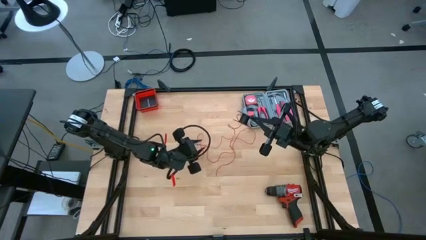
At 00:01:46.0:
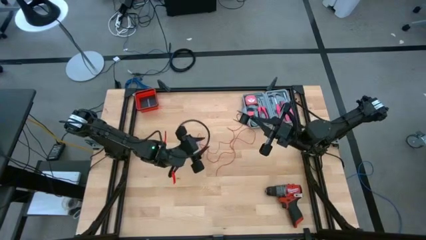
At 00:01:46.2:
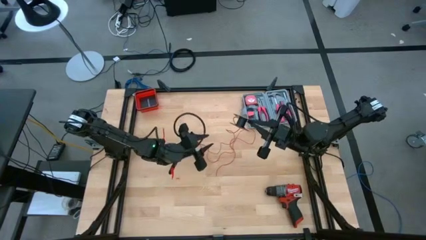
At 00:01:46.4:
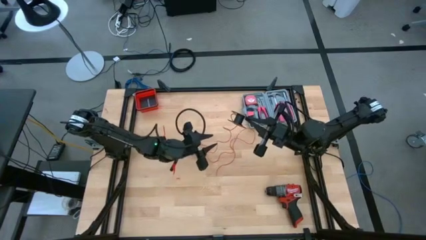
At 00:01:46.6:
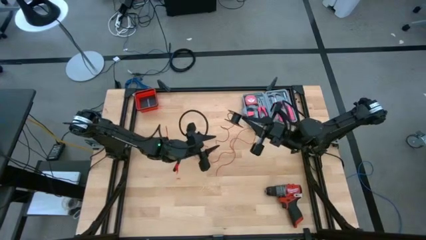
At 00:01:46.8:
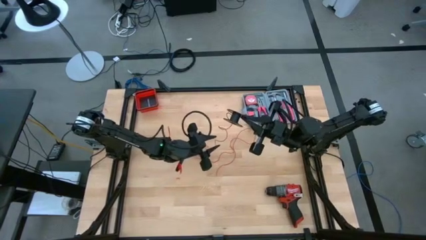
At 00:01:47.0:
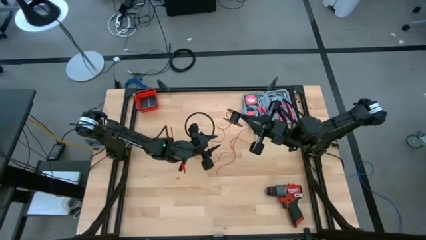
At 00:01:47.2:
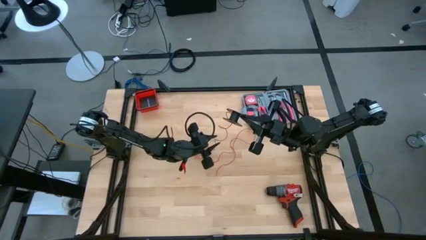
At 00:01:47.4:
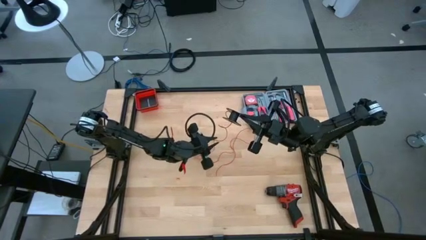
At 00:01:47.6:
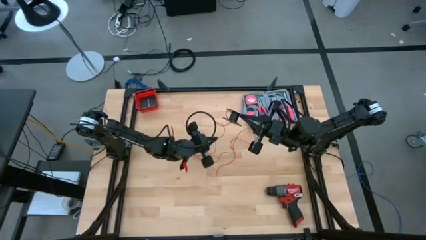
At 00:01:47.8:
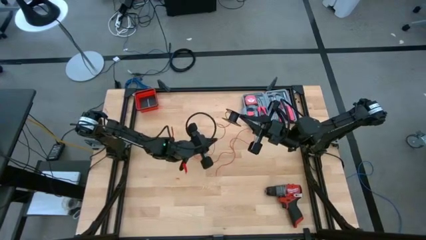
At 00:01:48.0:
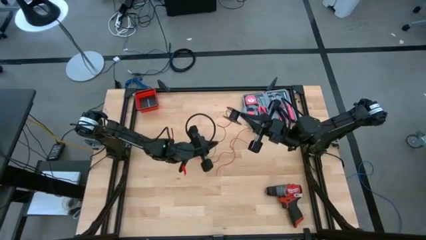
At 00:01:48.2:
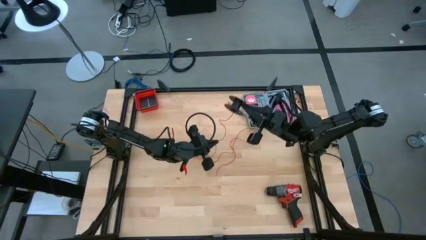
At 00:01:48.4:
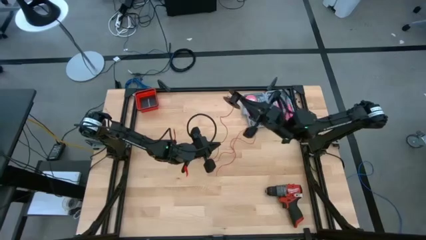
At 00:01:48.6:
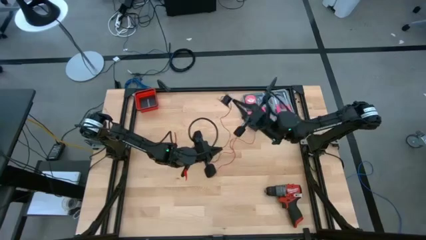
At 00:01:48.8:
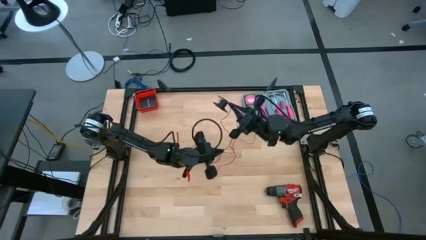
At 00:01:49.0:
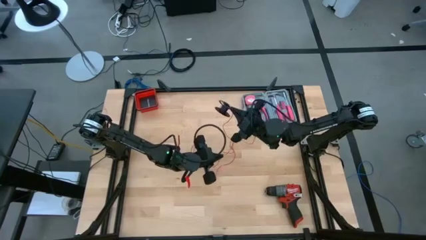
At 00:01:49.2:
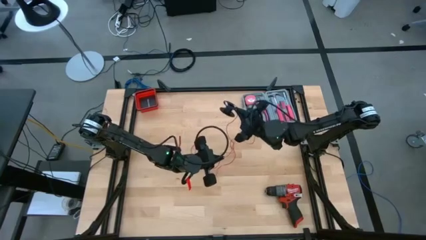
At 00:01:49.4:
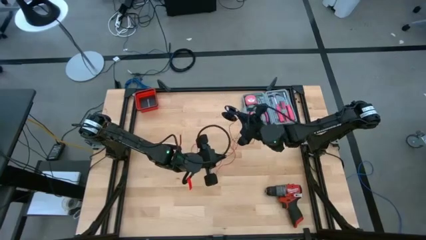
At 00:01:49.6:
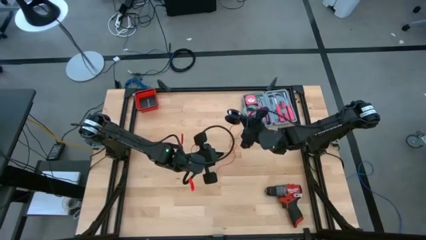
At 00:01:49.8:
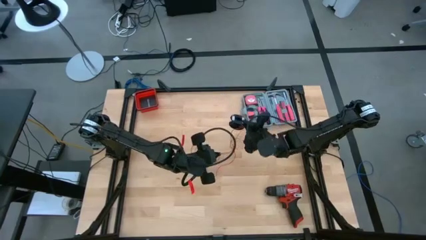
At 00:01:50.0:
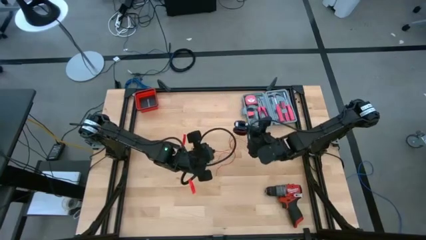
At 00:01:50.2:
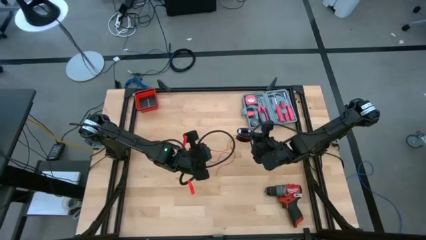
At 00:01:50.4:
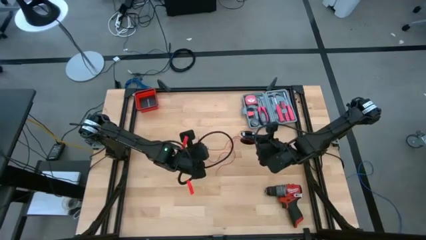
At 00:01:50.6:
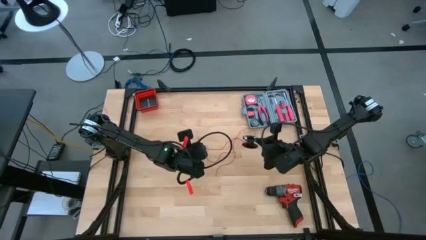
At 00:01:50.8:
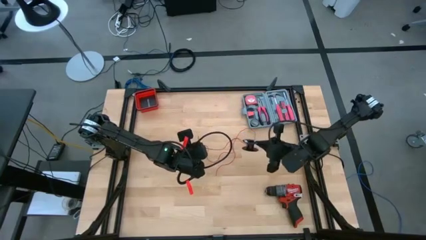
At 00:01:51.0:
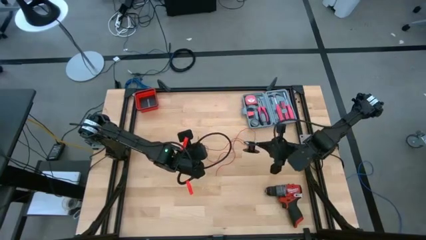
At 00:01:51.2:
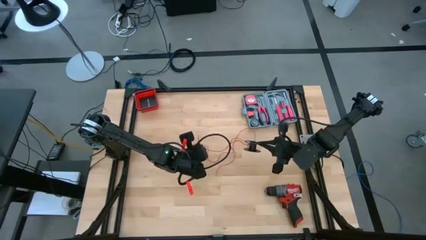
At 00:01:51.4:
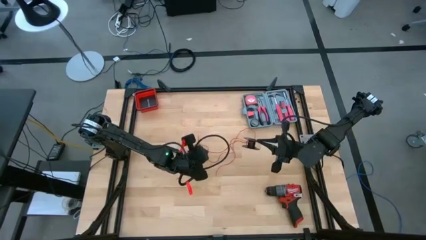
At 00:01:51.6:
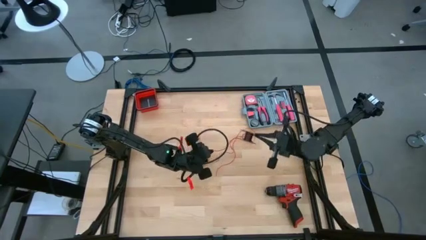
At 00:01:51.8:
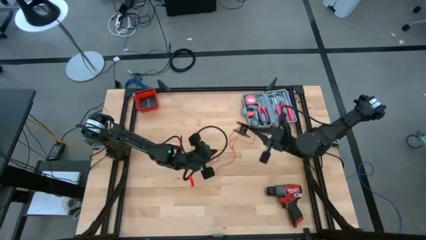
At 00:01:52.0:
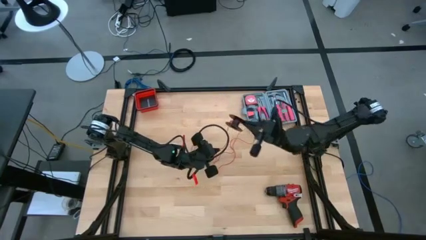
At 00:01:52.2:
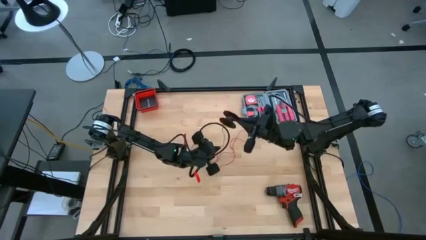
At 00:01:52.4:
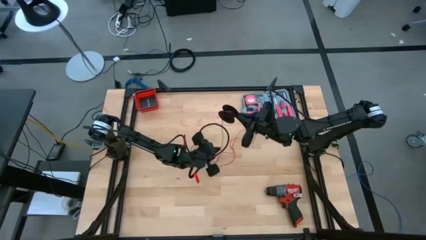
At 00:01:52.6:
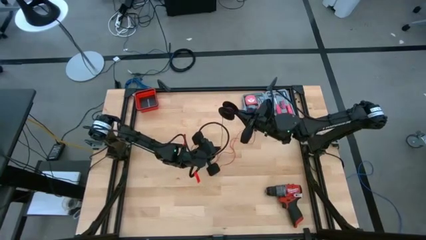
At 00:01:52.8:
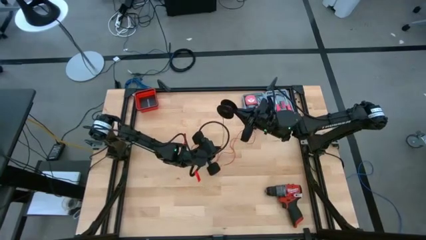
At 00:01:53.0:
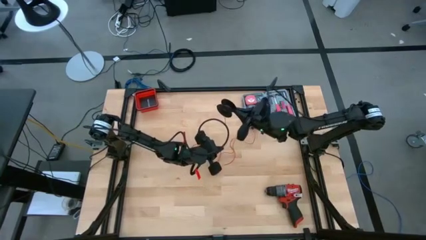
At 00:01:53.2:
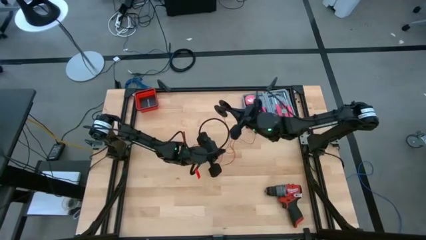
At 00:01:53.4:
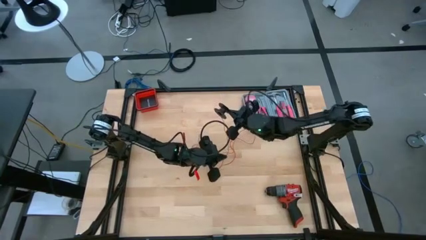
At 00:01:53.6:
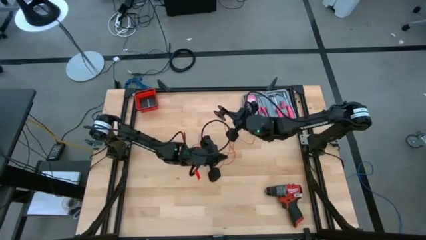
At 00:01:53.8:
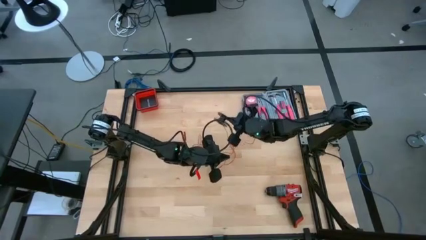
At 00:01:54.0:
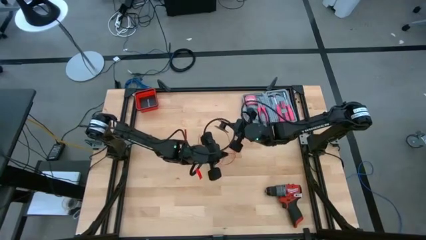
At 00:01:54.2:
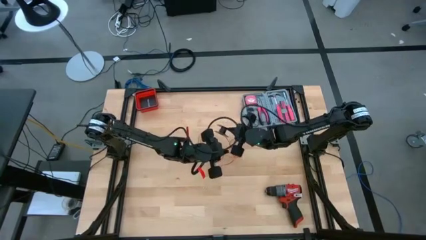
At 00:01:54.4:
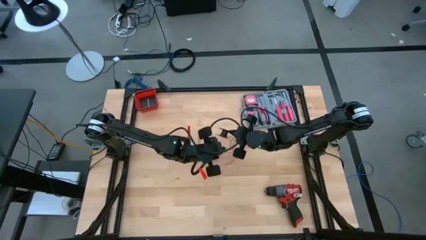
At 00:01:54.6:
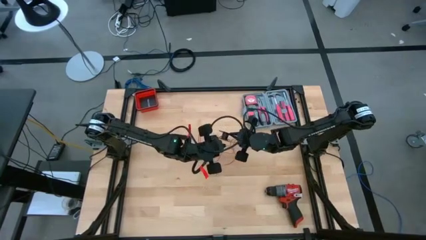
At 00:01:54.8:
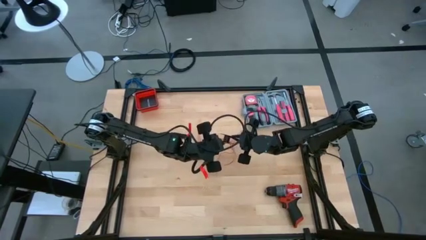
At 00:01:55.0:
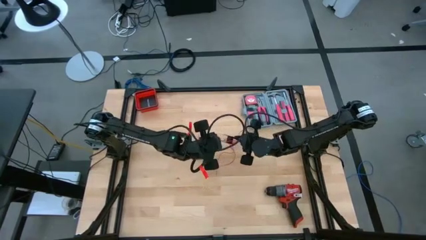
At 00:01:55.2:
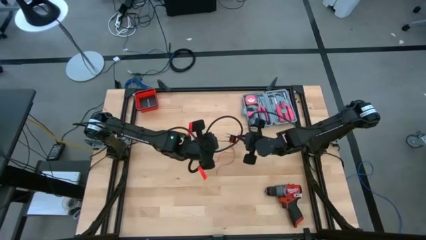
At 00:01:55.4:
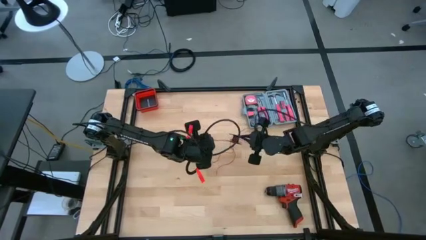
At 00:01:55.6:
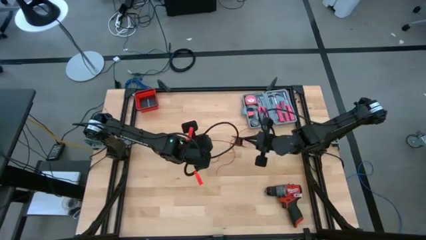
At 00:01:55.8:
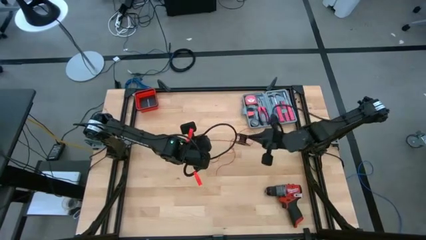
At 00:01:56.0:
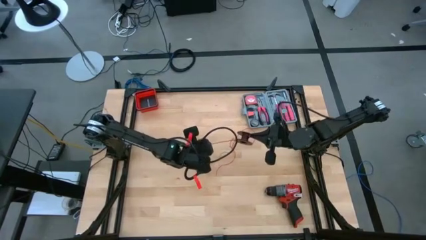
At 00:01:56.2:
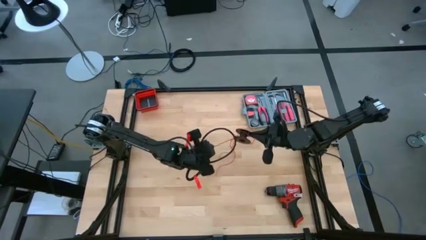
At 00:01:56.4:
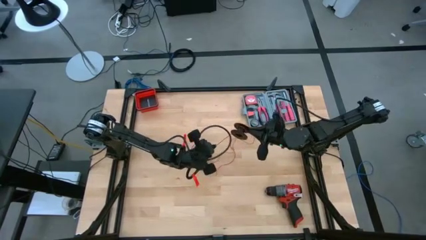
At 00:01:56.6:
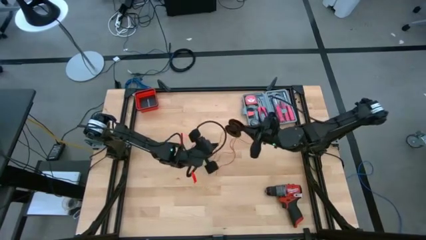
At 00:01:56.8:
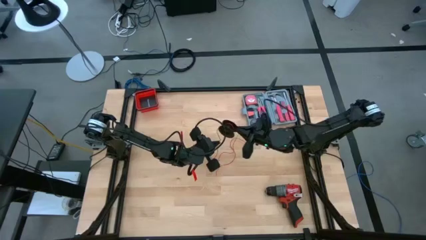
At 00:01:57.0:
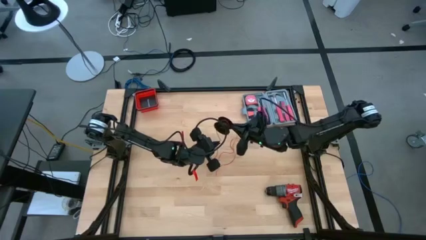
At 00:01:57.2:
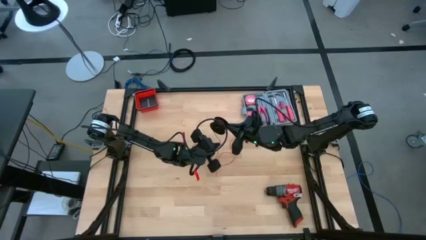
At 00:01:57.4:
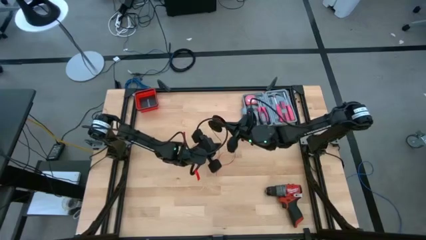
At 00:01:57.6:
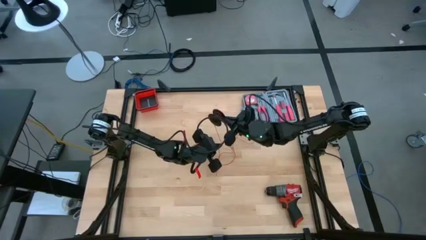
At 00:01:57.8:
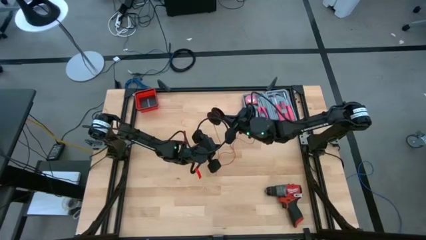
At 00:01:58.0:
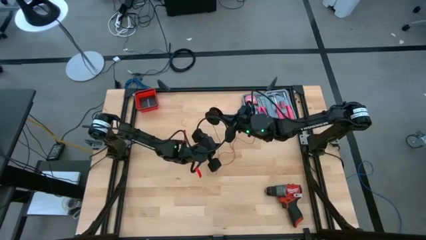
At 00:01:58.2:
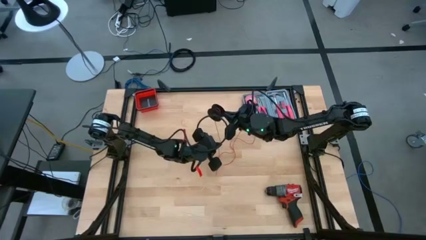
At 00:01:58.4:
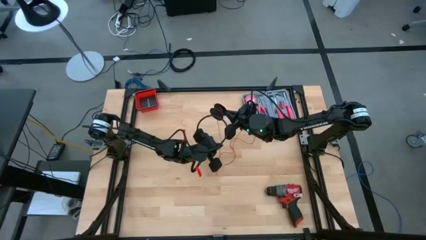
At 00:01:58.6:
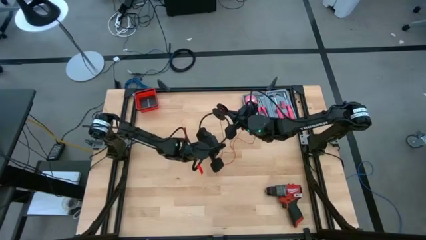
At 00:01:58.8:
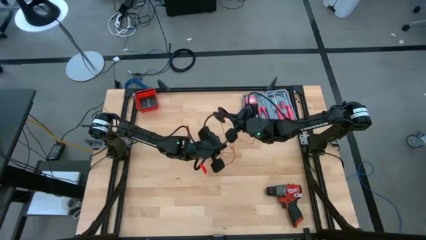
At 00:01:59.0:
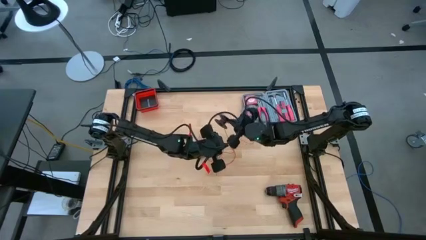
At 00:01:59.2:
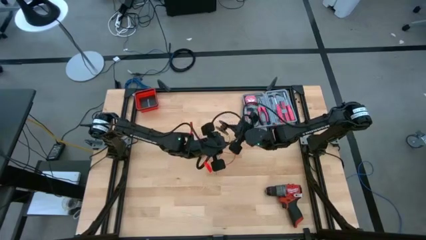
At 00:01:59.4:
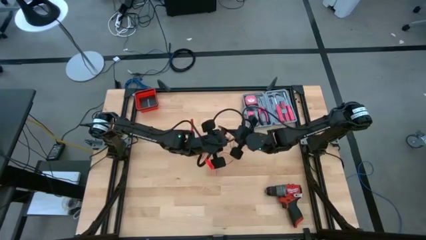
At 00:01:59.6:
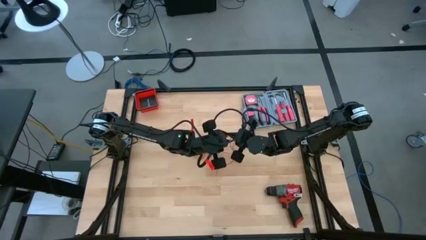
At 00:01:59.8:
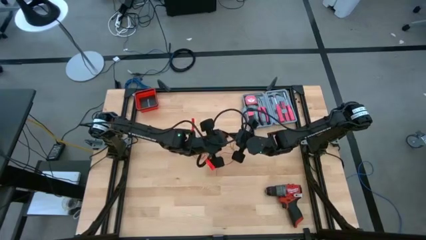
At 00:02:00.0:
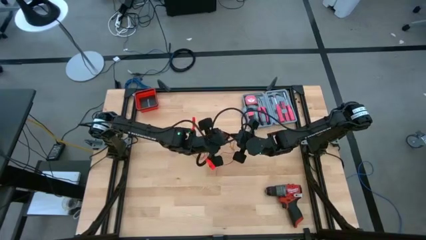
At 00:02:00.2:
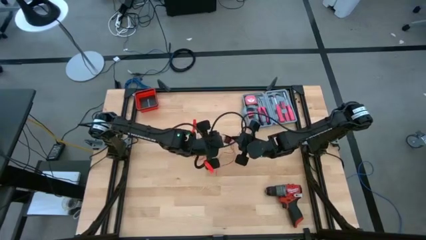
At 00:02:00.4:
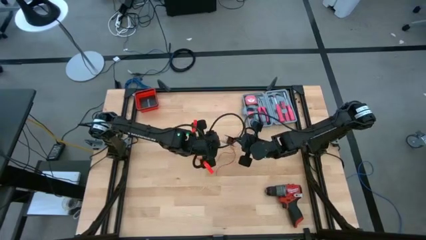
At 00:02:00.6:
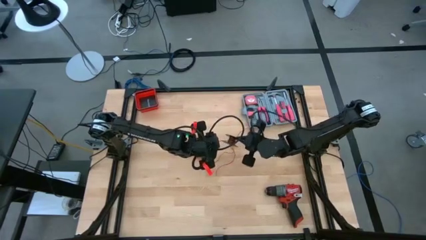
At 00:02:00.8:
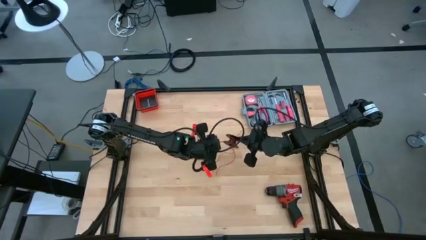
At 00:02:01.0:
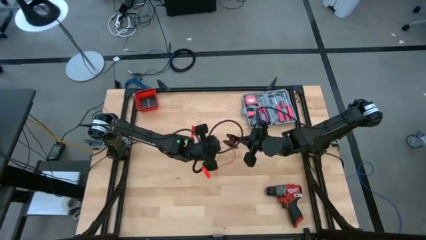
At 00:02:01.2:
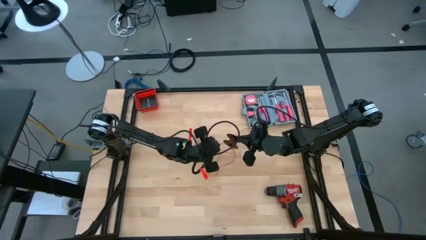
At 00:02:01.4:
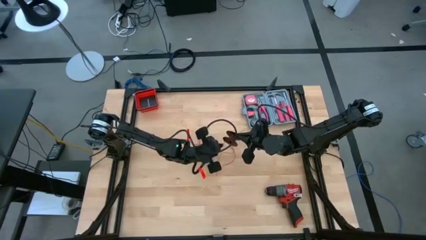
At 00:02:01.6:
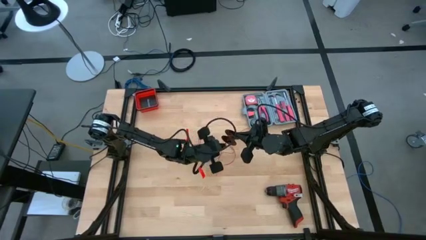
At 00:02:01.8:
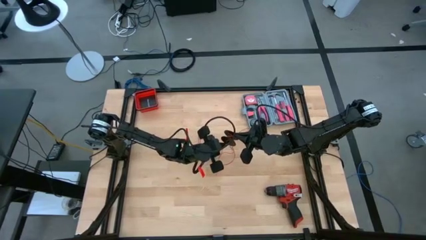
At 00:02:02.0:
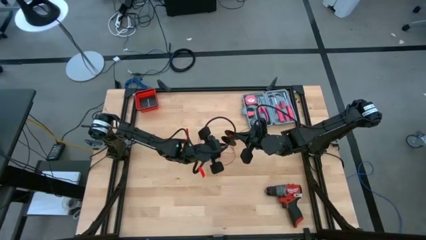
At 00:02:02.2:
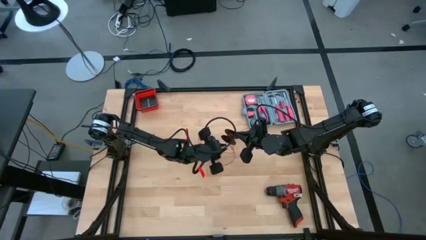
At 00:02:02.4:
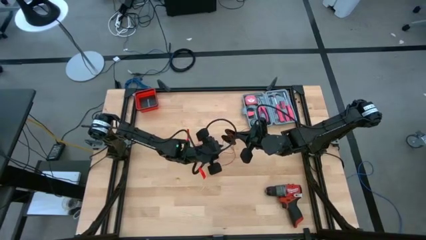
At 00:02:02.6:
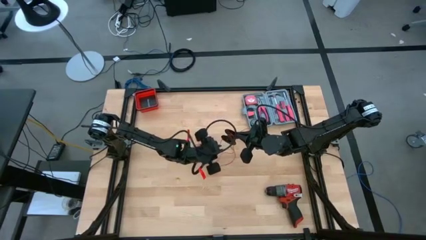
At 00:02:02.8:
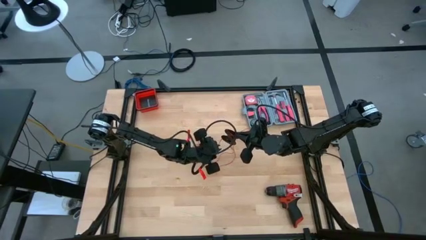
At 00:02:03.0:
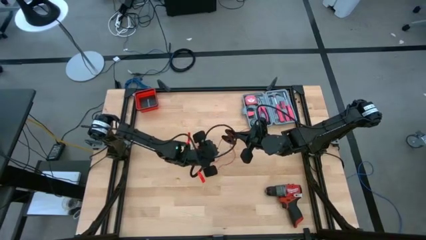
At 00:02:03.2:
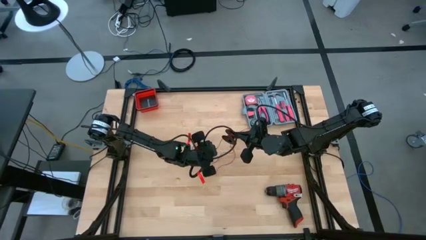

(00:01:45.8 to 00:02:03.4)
Task: Coil cords
Coil the red wire onto the black spool
